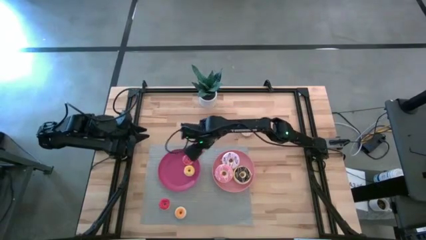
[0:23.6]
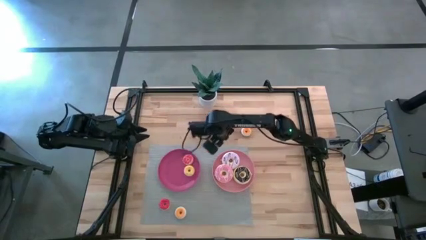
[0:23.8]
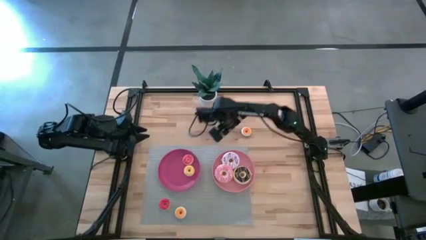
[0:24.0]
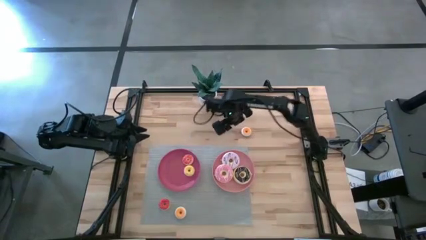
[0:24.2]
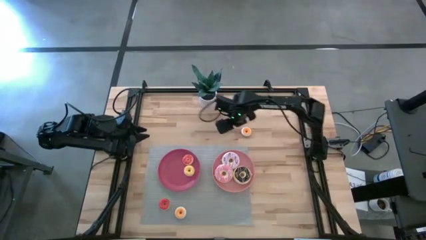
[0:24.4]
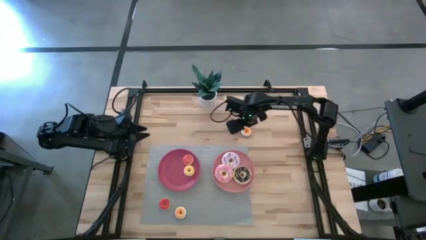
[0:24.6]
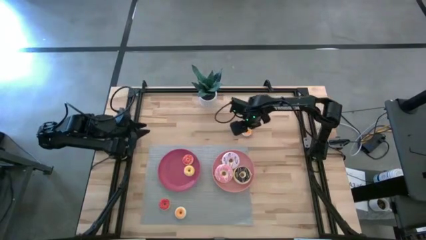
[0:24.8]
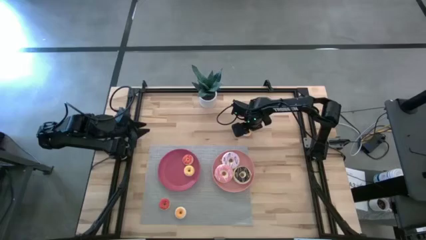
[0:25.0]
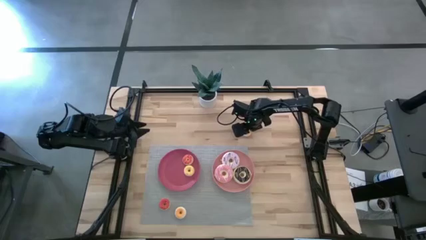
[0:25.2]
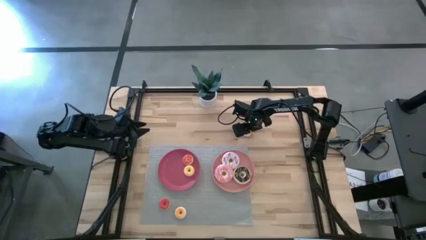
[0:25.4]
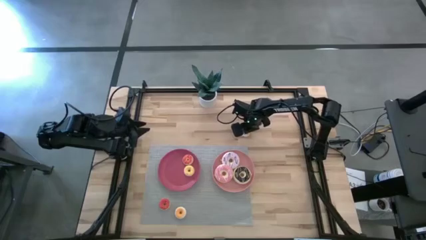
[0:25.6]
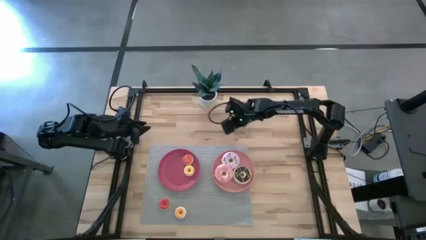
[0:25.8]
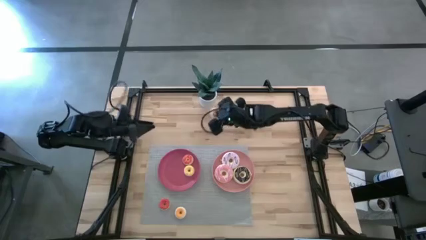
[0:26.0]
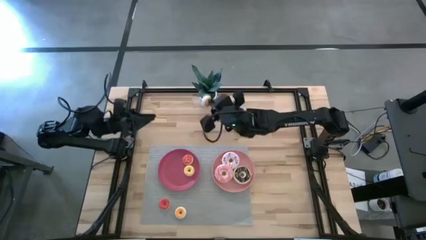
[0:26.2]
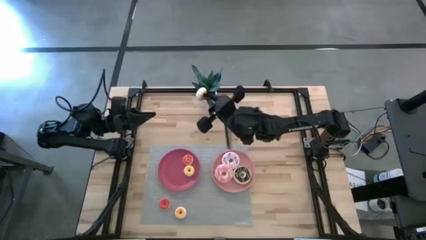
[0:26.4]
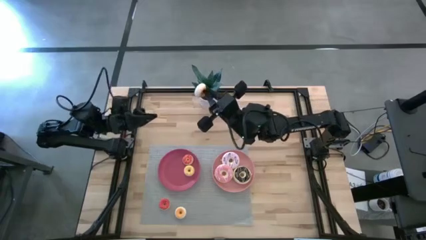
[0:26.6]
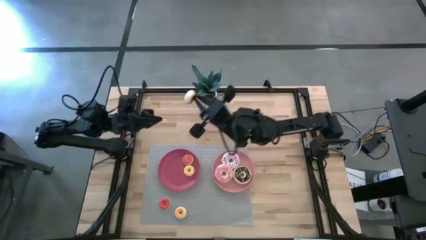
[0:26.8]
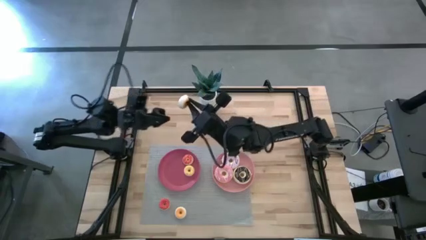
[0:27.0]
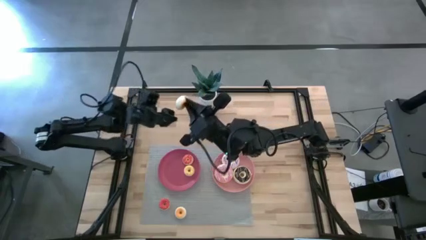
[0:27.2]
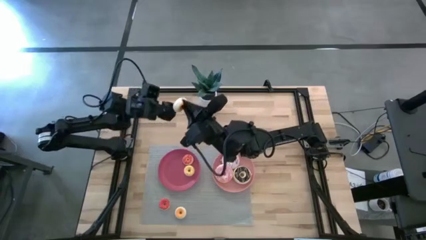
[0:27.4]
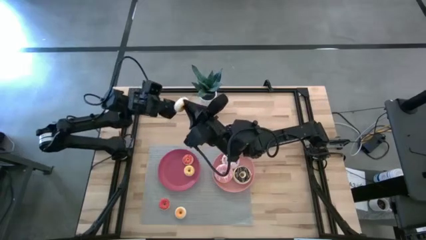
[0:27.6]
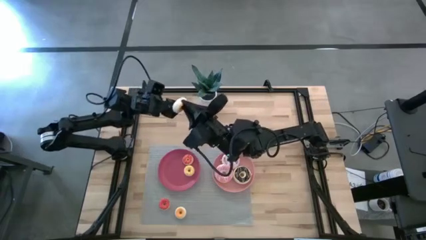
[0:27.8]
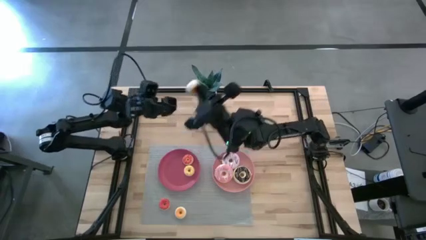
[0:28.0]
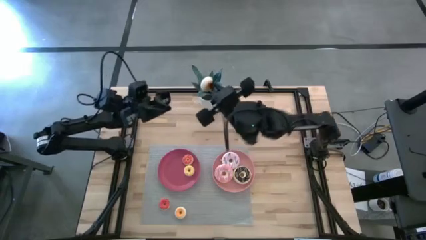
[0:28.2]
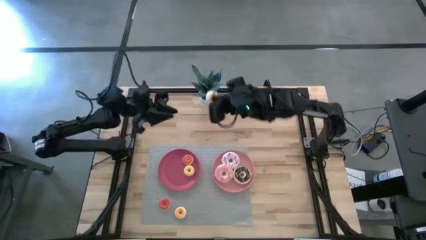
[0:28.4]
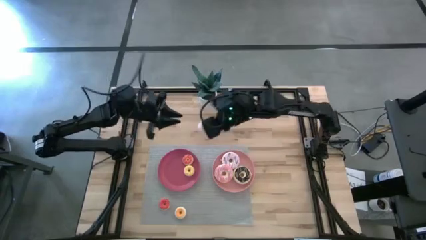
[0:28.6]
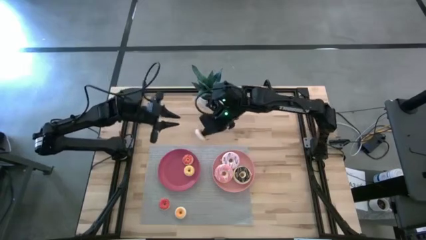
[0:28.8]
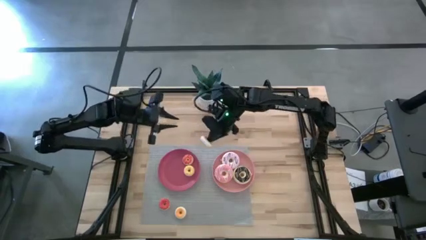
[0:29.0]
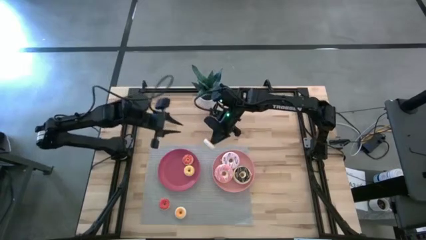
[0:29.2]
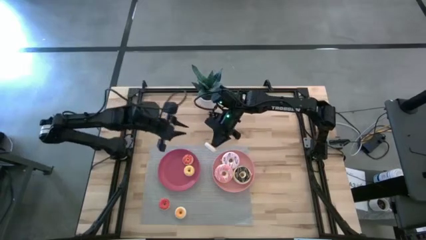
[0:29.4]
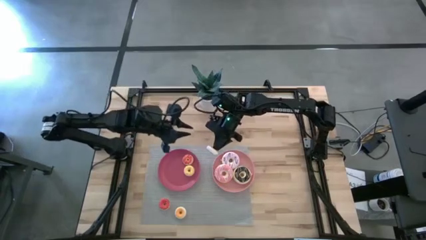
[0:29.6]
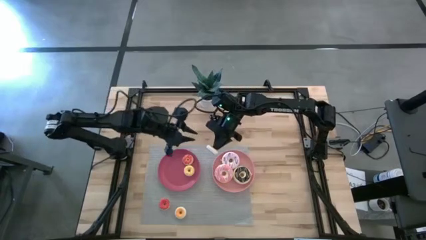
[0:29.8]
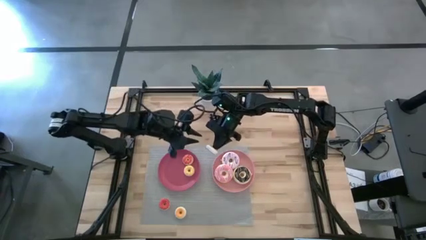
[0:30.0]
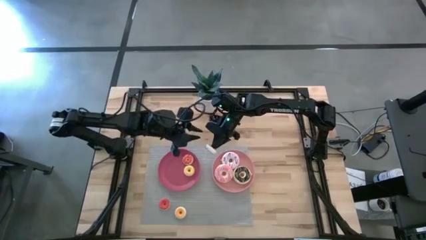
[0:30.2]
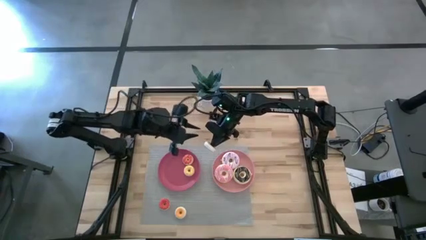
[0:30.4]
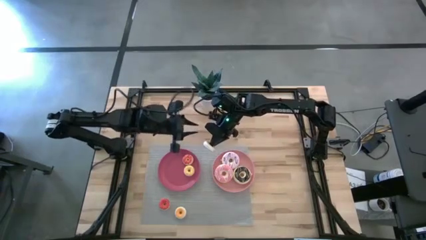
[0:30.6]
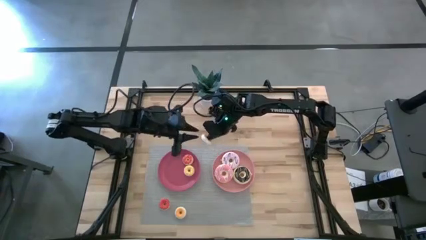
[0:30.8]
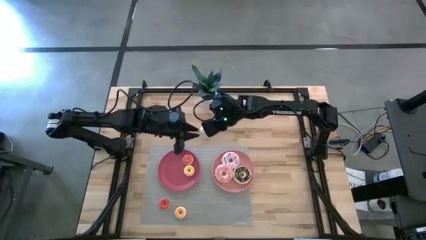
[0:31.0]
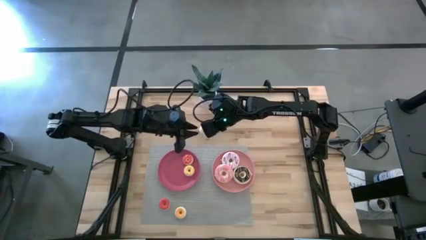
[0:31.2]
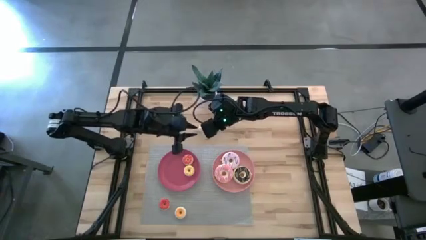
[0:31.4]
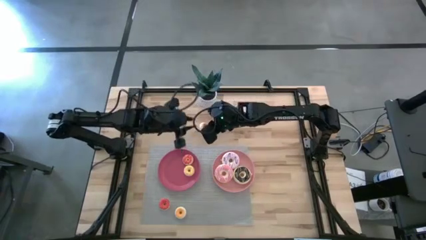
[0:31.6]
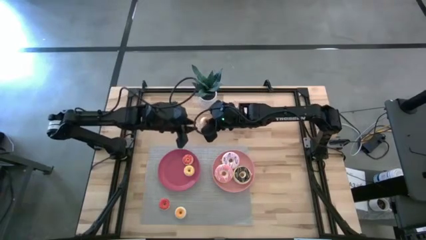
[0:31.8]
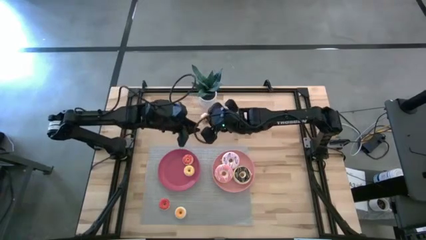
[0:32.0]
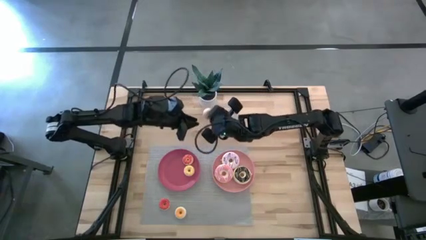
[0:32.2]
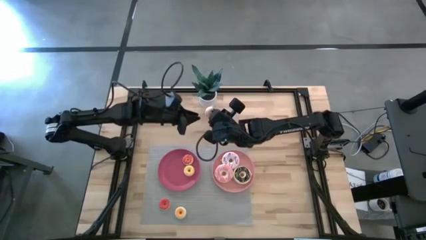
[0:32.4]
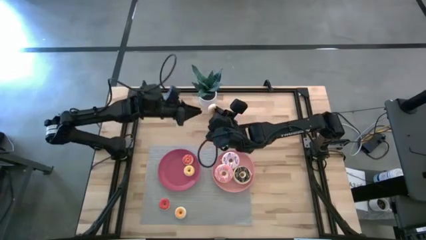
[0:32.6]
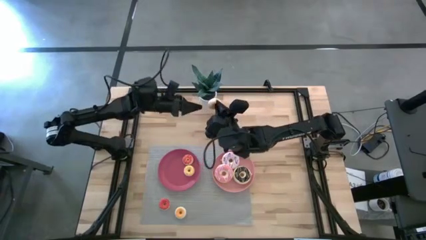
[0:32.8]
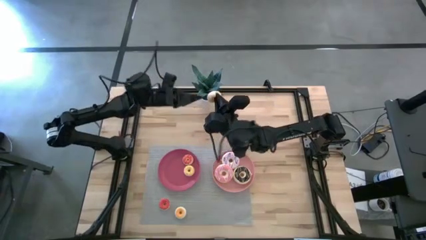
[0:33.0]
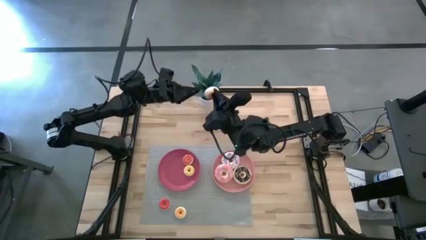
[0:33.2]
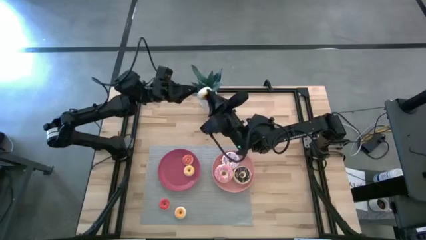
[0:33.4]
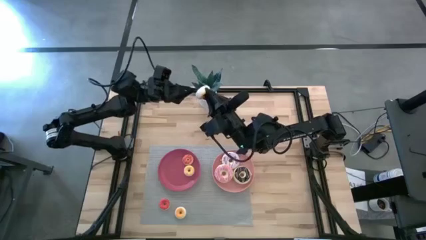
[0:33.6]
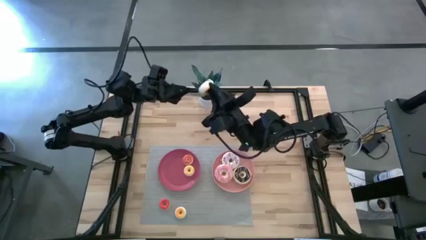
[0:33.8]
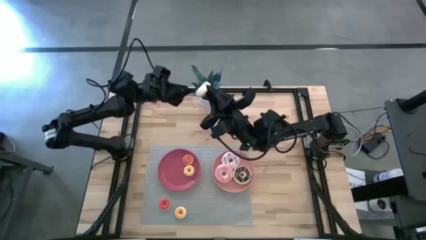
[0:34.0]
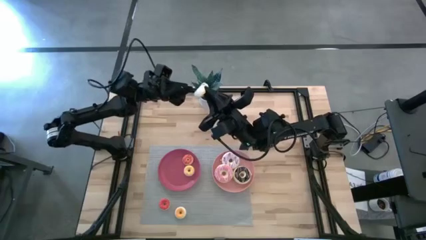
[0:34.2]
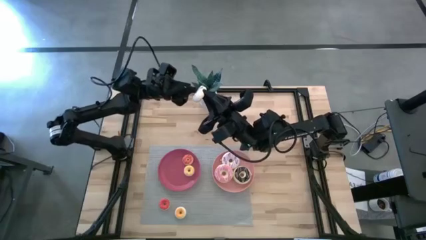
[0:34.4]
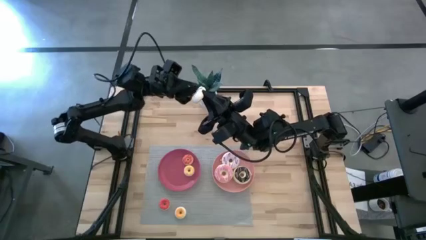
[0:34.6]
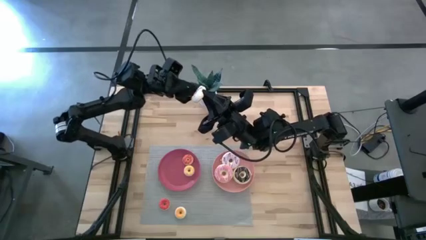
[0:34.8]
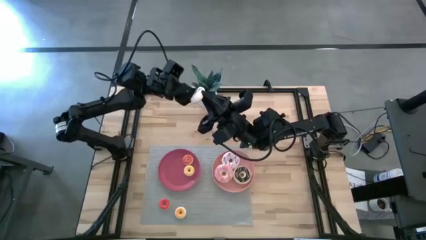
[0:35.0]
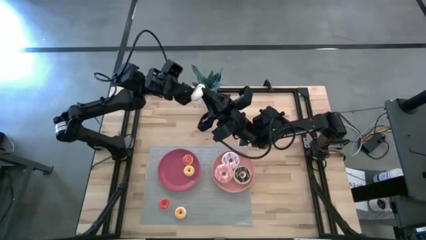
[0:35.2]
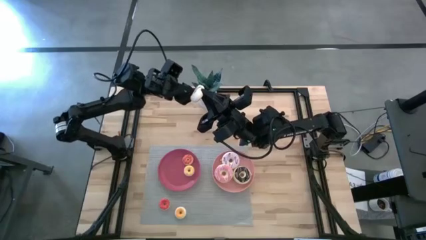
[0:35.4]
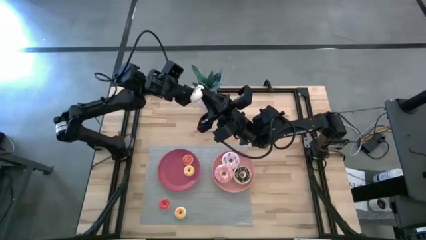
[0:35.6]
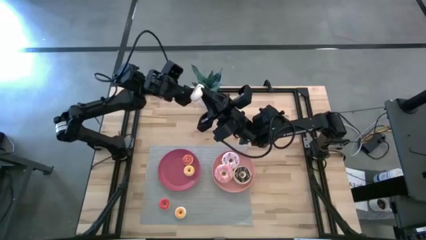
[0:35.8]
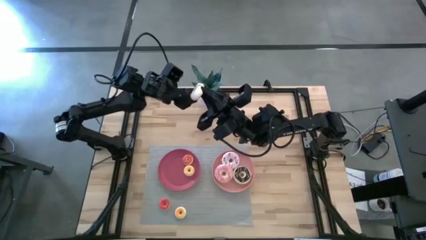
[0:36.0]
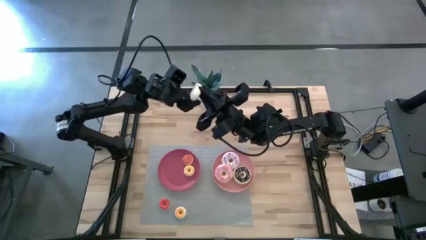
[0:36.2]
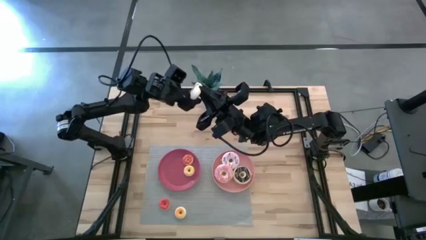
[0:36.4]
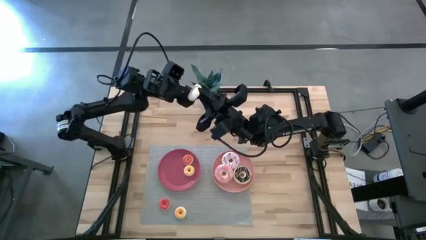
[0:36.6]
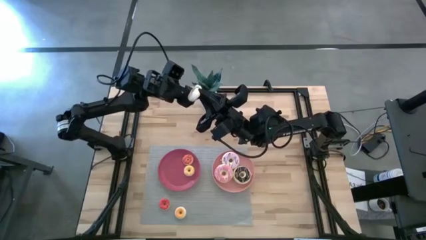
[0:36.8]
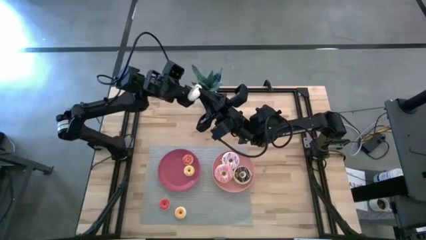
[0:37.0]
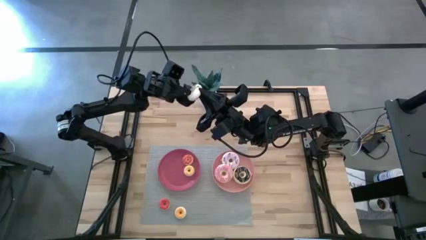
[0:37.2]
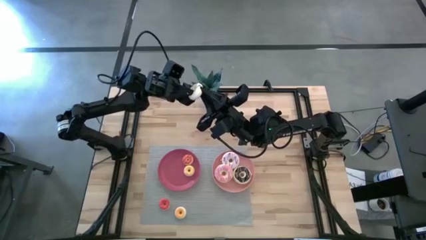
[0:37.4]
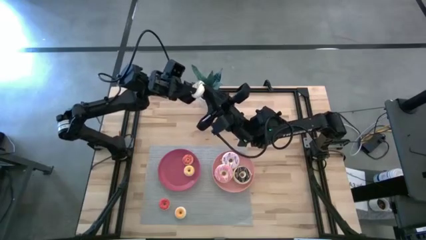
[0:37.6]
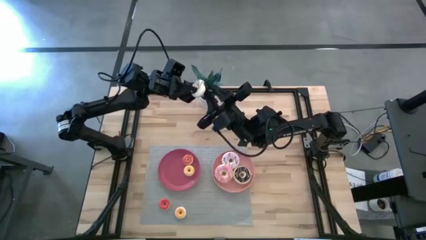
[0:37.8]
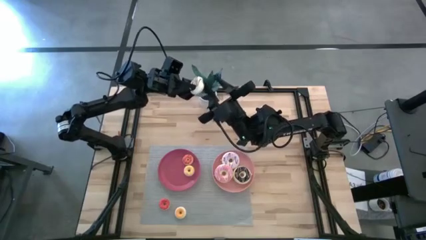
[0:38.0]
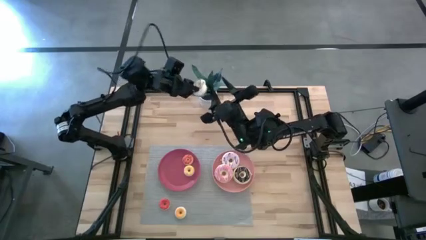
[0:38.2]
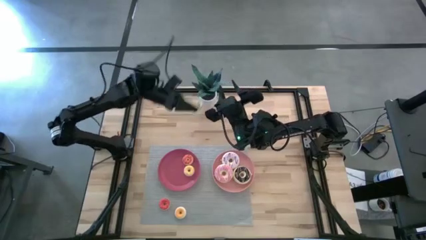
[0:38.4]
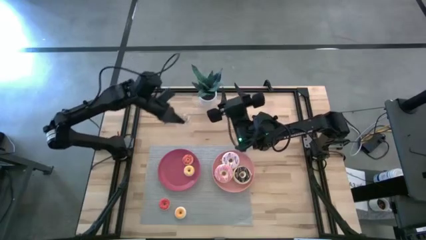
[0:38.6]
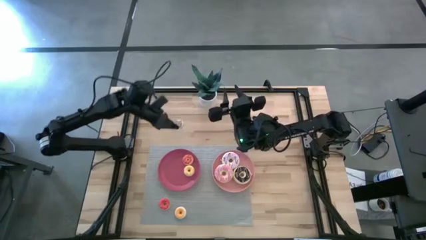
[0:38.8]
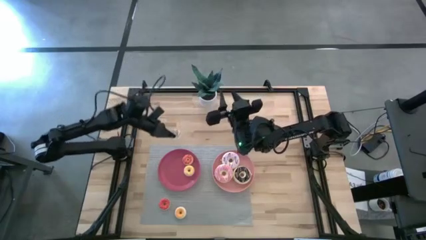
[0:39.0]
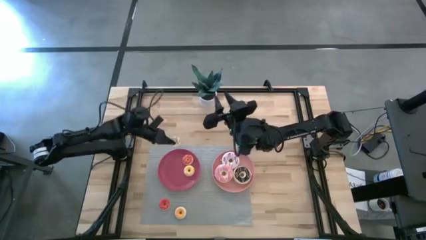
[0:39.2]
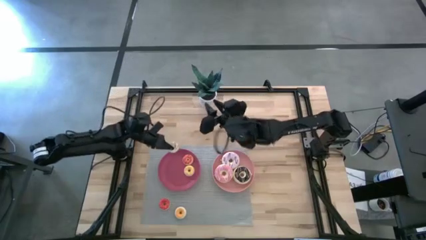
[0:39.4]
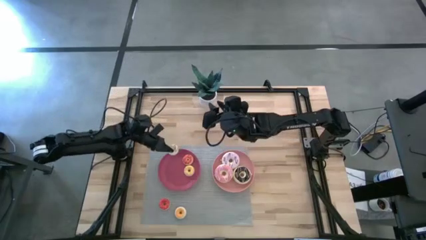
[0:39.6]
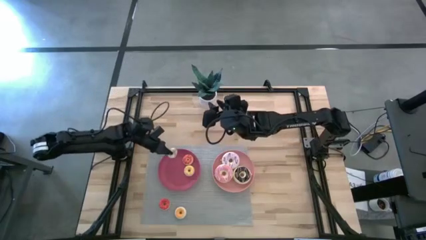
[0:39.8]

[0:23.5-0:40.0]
Task: Pick & Place donuts
Put the small white donut on the dark pink plate

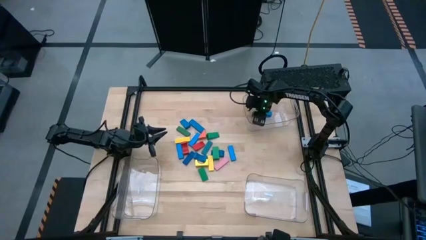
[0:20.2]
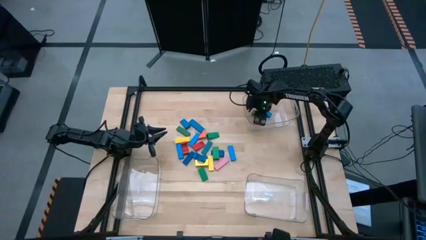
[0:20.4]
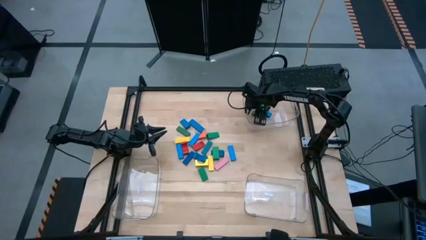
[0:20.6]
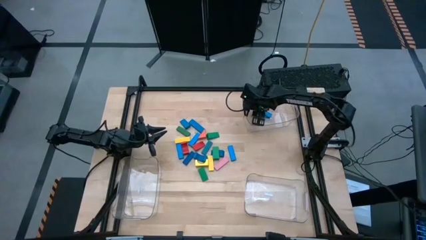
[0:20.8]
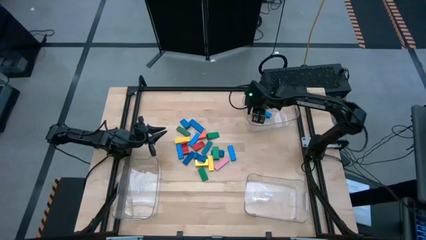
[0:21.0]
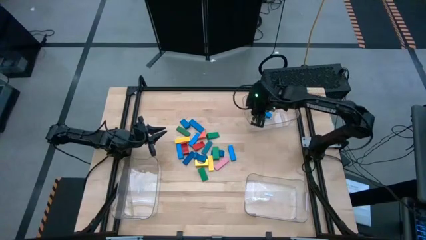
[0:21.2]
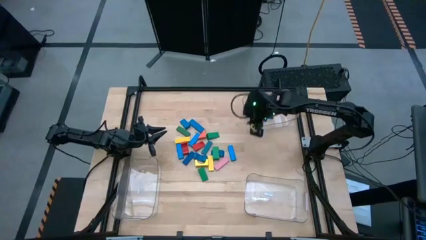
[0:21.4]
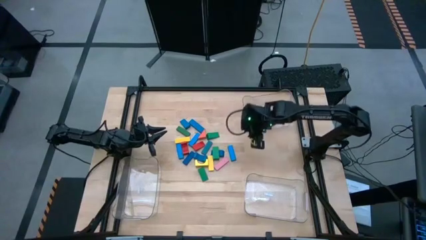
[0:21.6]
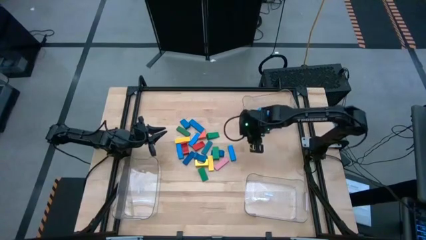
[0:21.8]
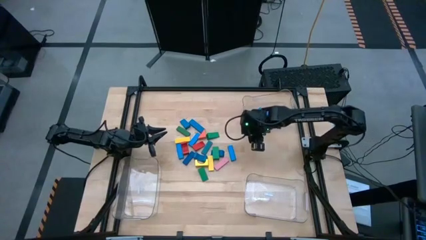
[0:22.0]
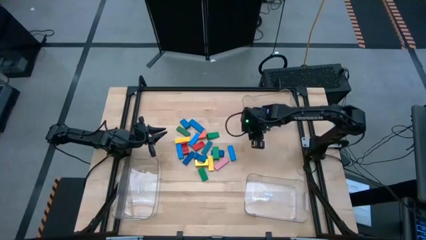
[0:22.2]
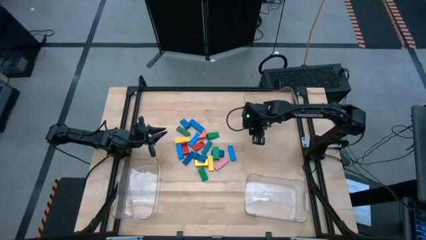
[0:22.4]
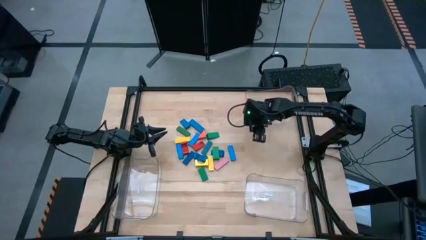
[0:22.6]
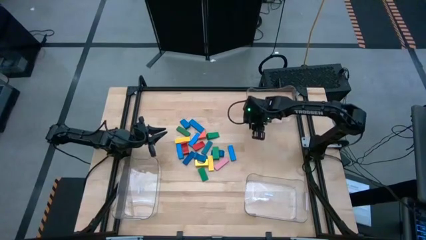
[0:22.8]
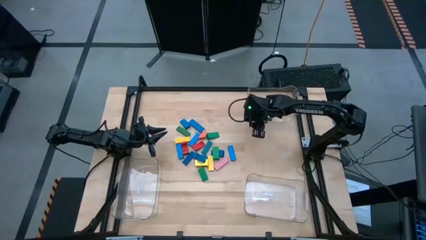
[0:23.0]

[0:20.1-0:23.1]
Task: Sort blocks by size
Adjust the top transparent bin
